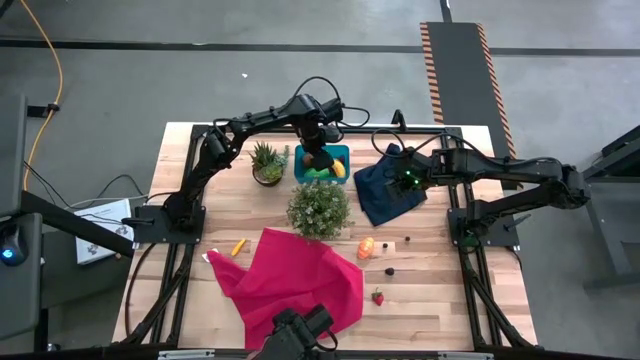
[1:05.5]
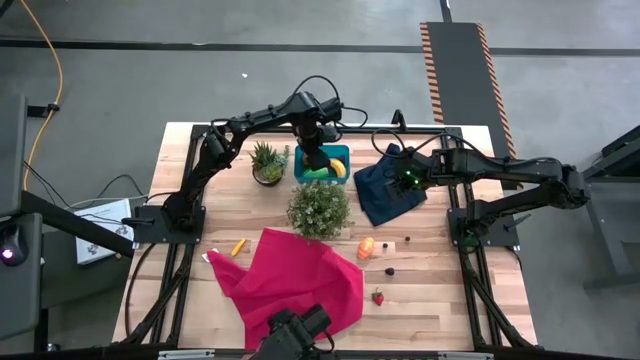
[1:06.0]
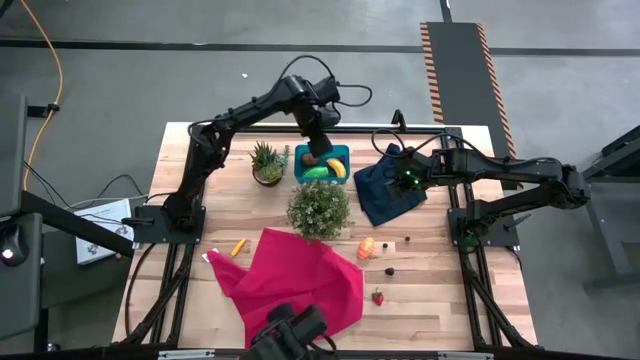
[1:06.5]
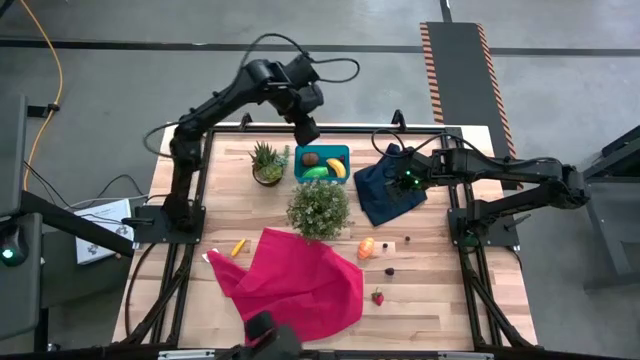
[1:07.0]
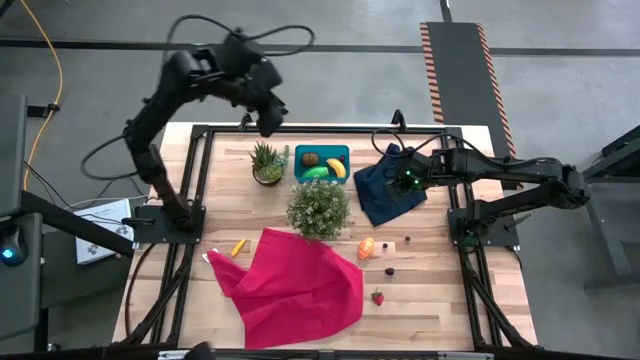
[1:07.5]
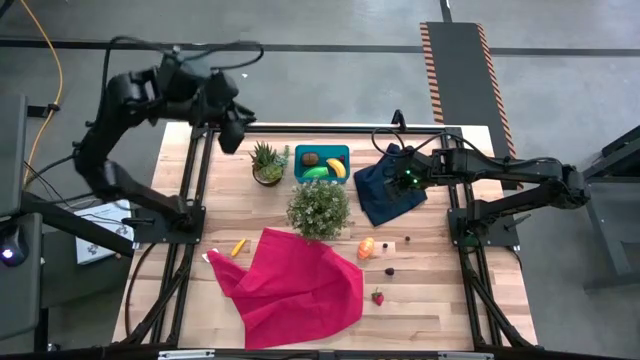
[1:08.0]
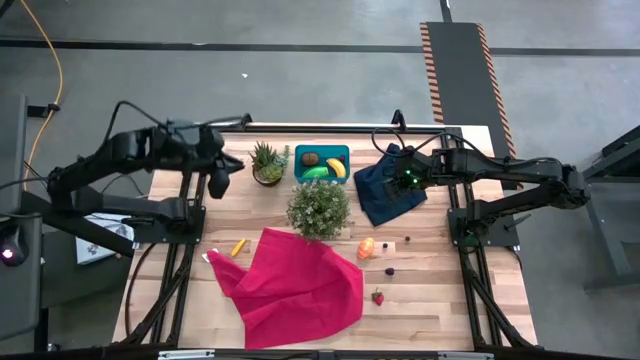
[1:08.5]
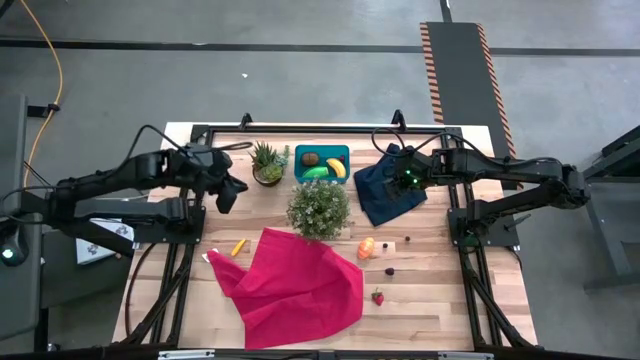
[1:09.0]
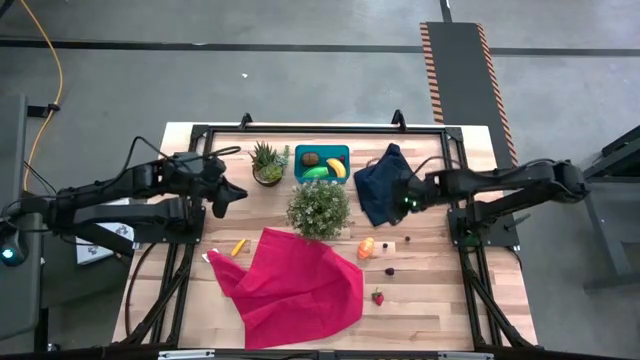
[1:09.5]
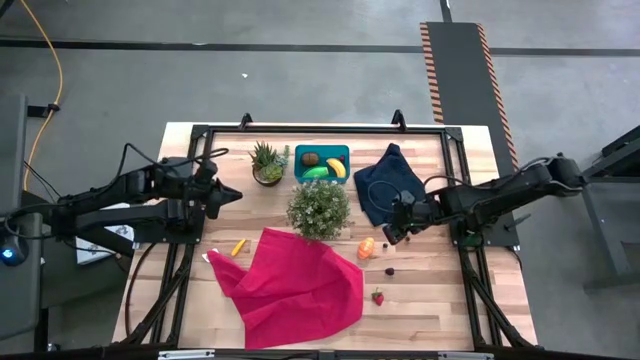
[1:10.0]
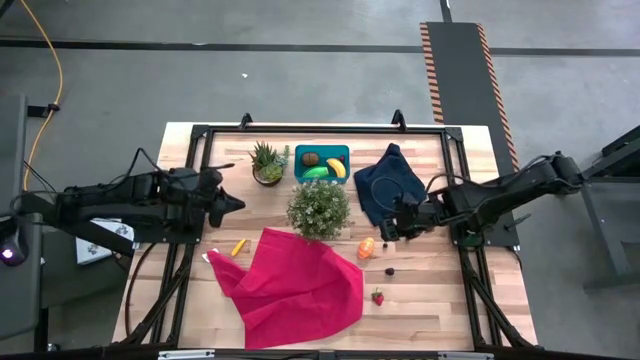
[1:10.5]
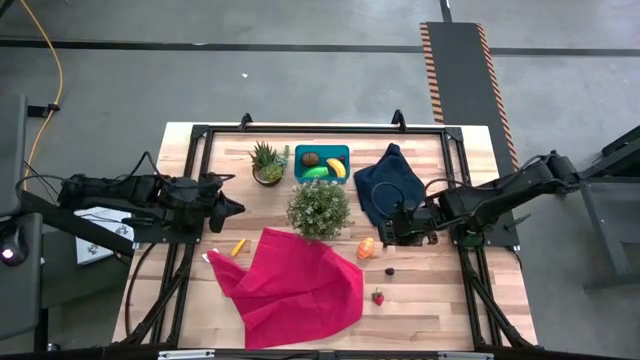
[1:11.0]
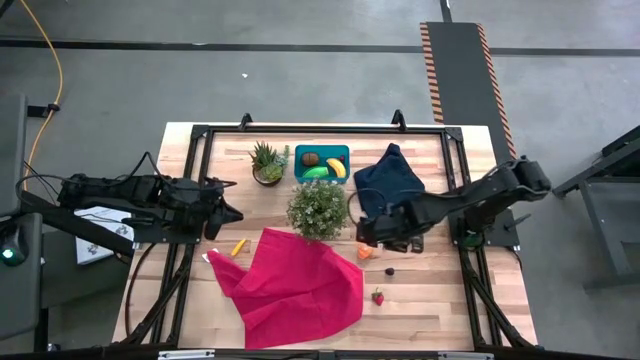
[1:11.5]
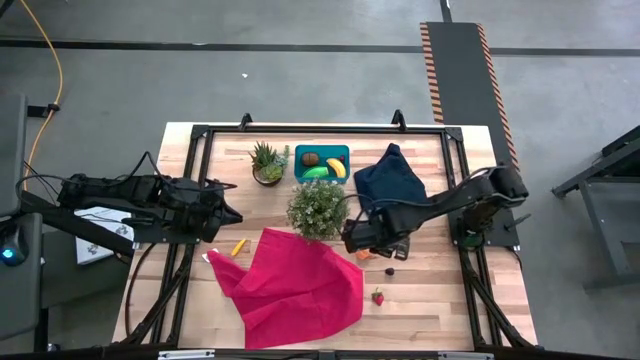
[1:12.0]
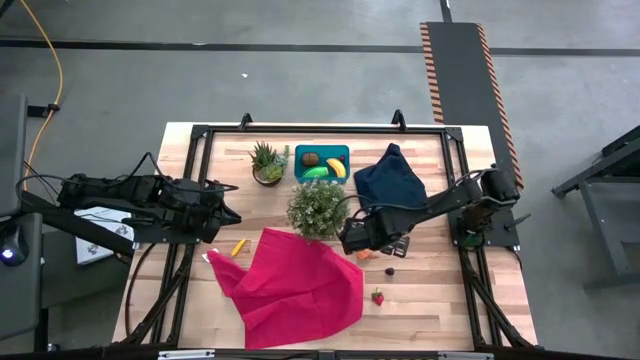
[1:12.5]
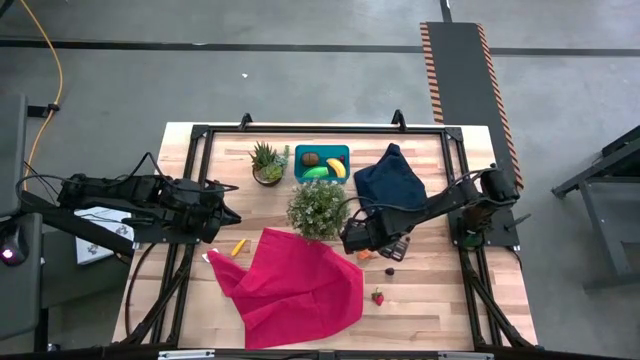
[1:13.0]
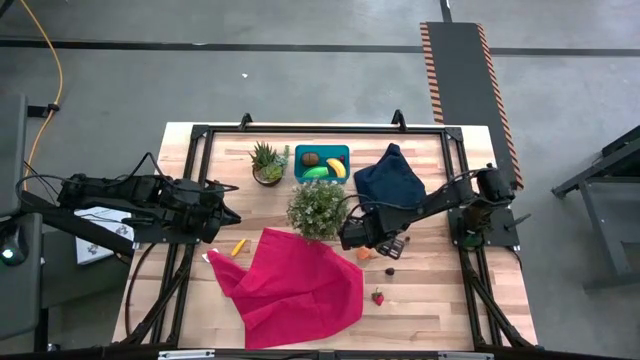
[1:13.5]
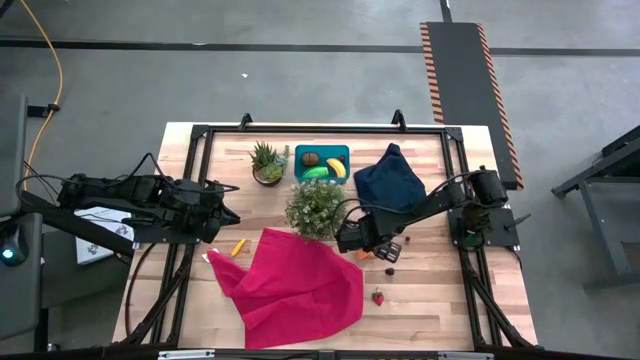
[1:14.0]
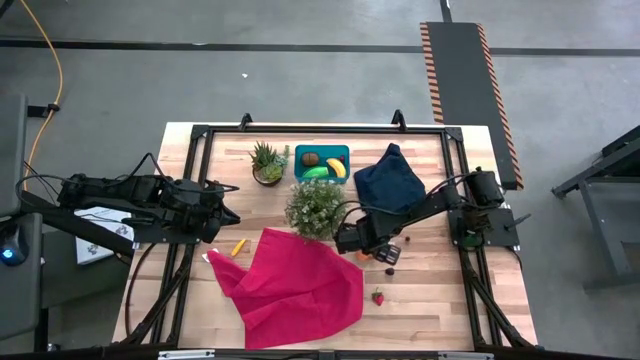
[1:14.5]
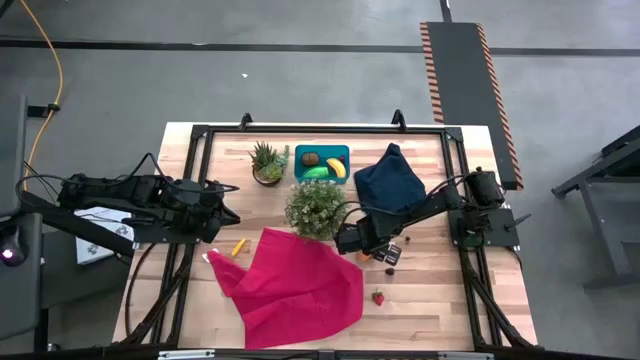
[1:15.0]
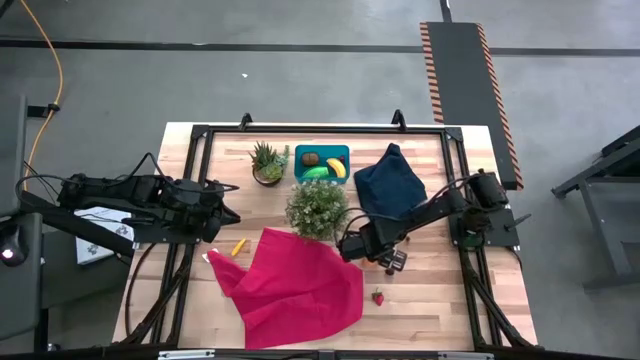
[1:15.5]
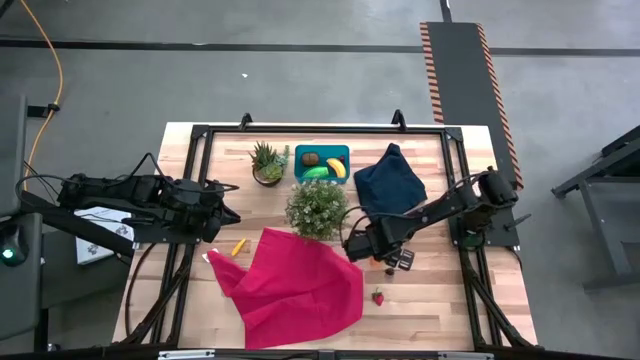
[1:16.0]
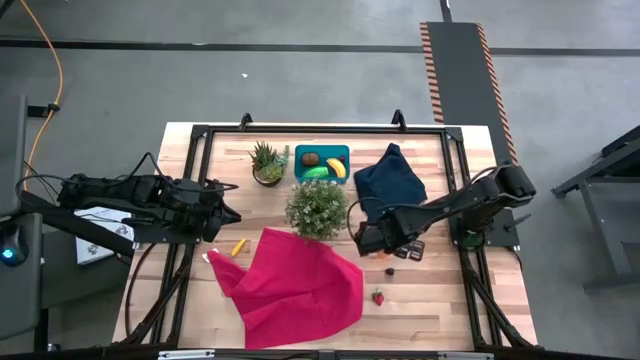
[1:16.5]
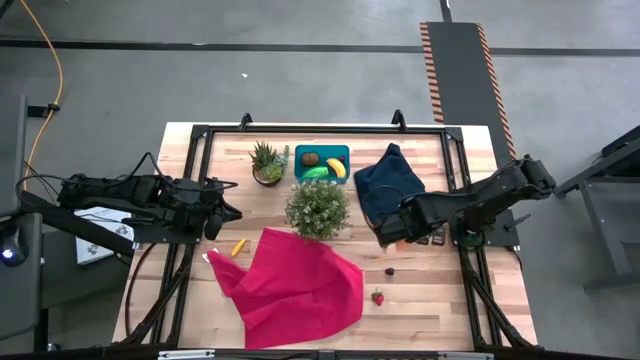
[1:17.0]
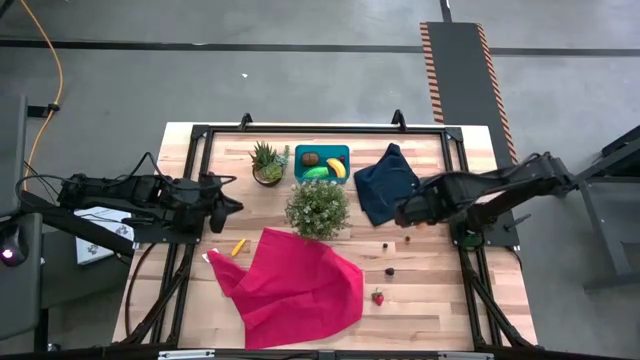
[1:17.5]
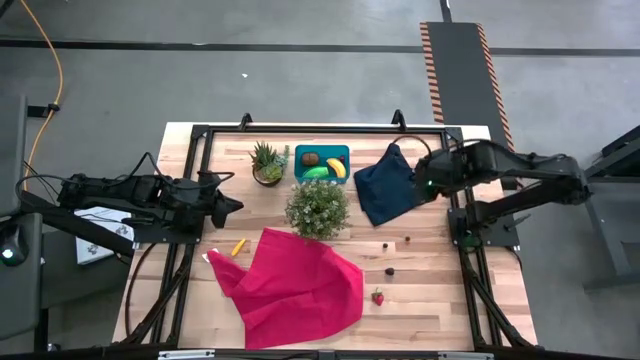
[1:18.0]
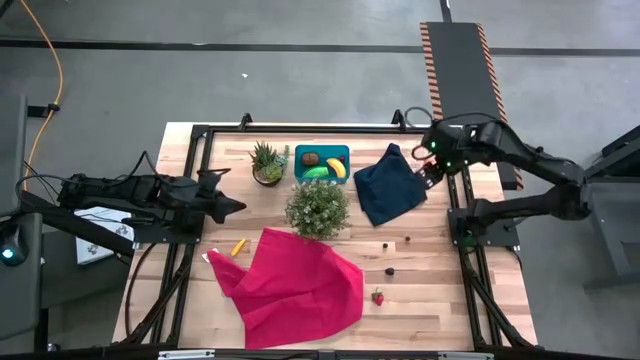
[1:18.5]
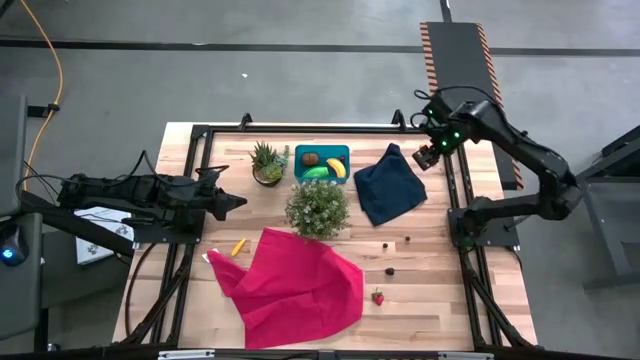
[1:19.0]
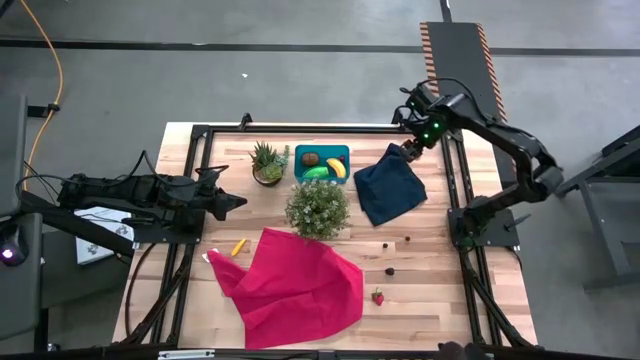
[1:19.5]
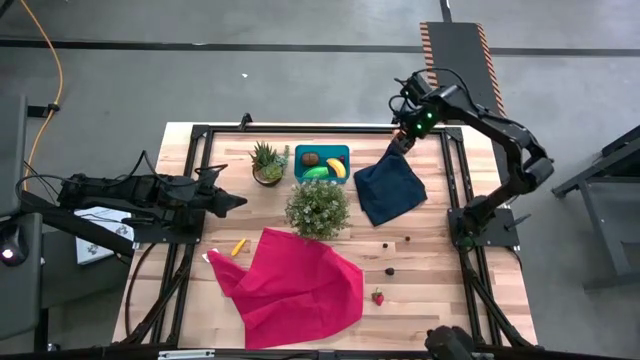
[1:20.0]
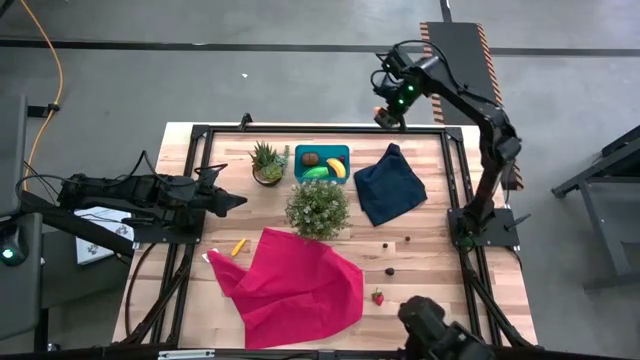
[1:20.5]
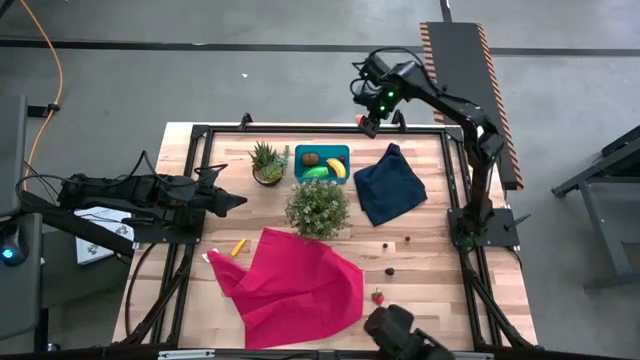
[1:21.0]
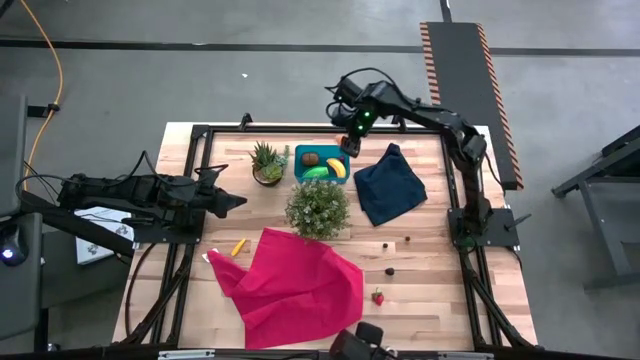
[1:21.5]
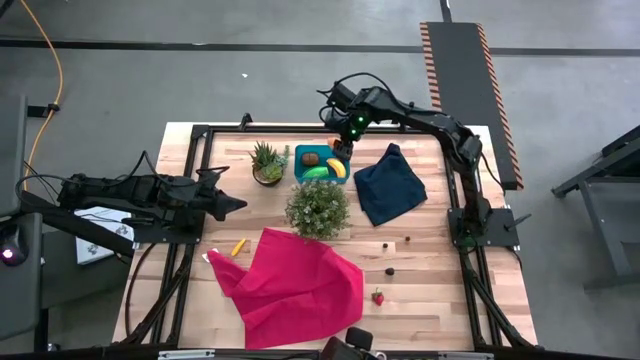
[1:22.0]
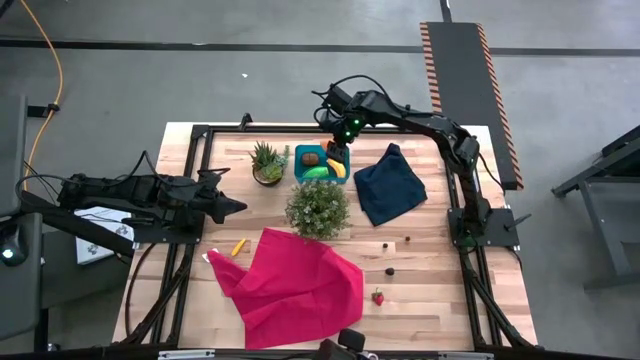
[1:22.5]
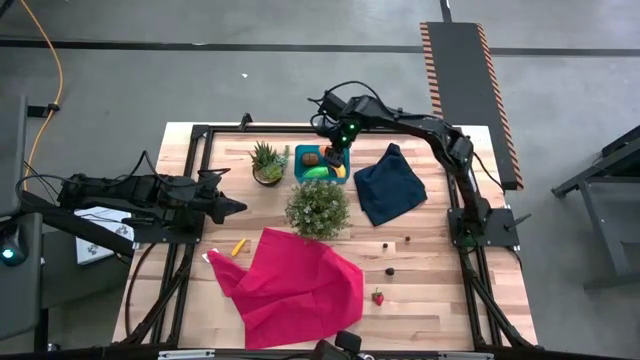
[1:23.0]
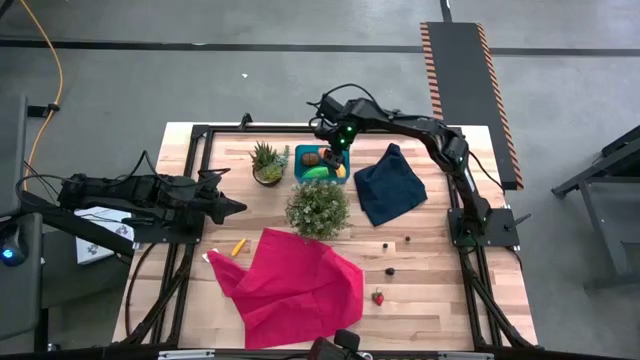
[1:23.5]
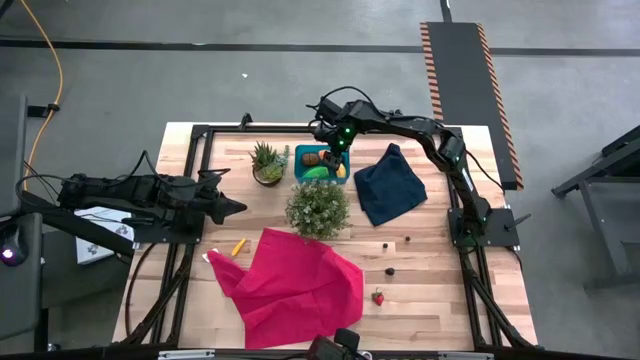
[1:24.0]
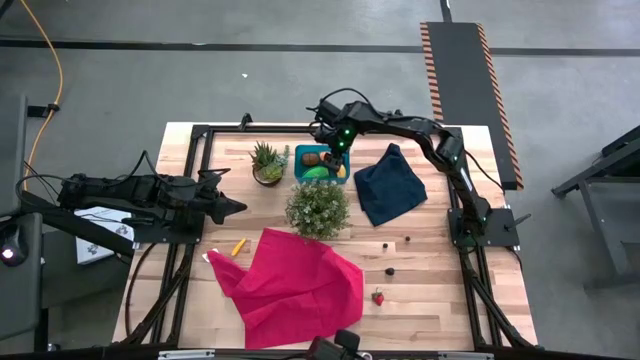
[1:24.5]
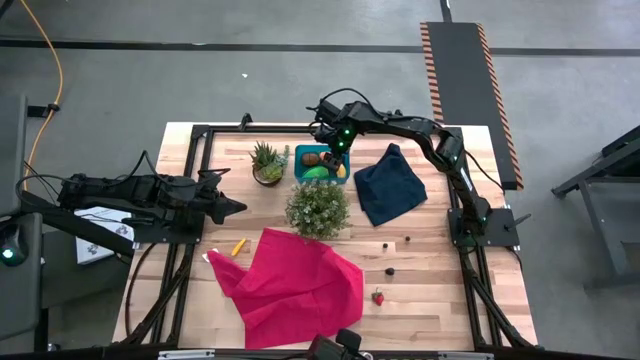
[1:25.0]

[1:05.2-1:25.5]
Task: Pick and placing Produce into tupperware
Put the light orange croissant into the blue bin
